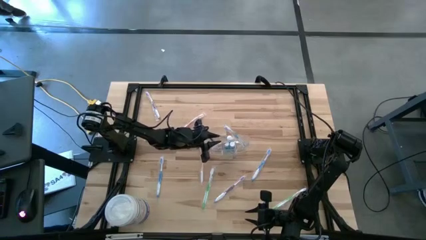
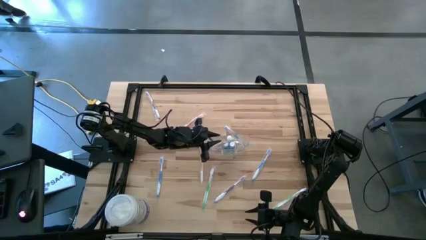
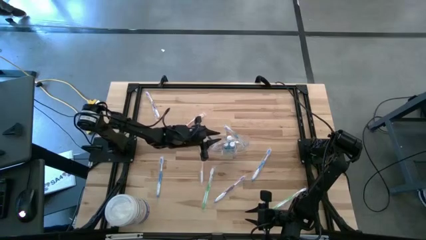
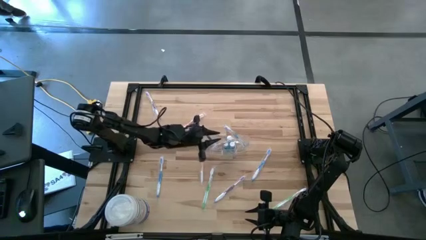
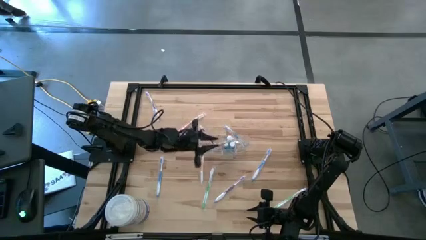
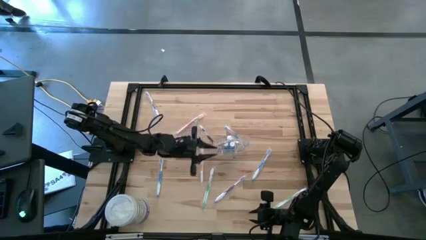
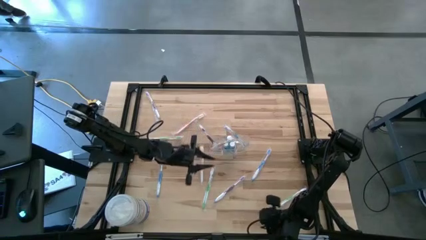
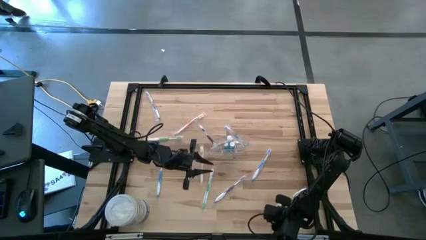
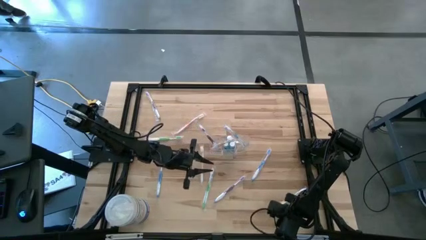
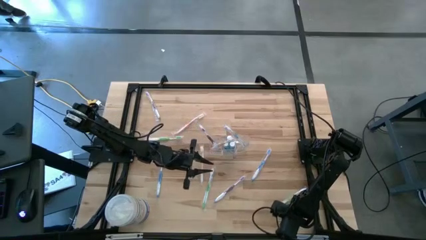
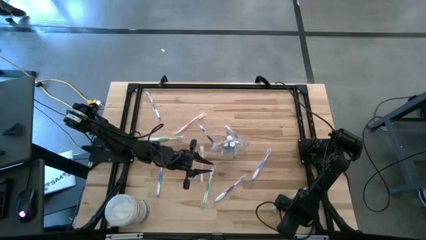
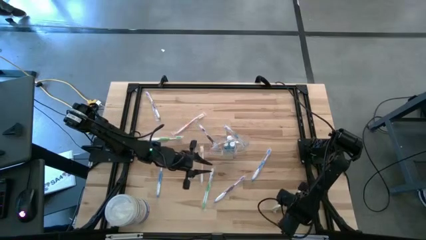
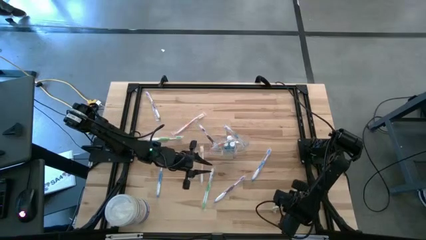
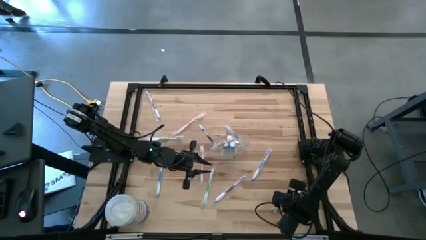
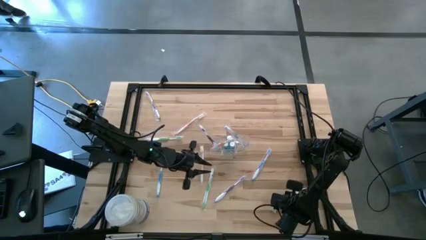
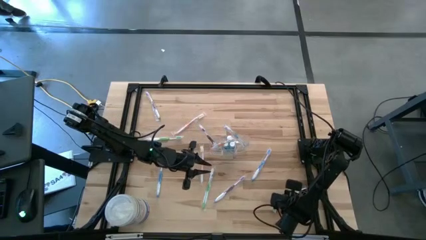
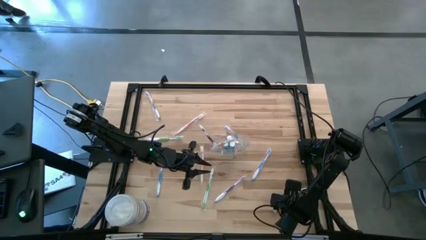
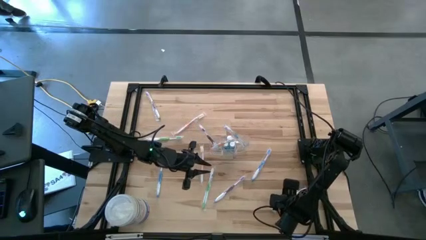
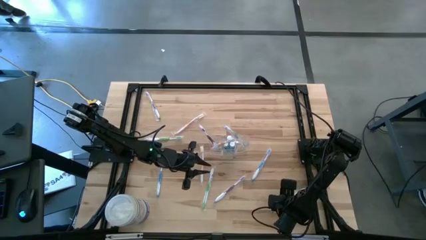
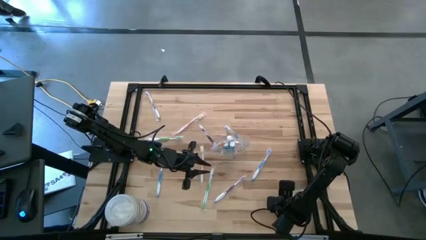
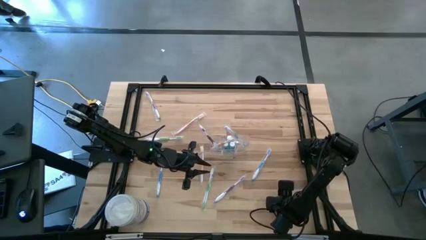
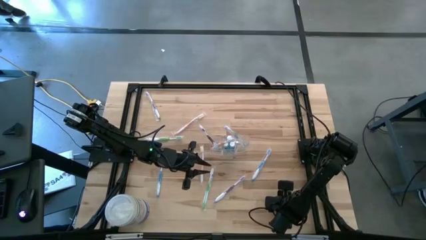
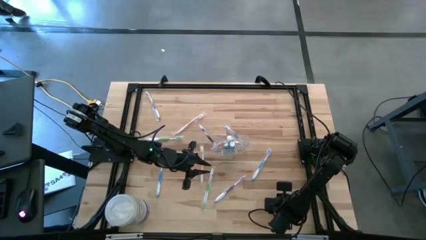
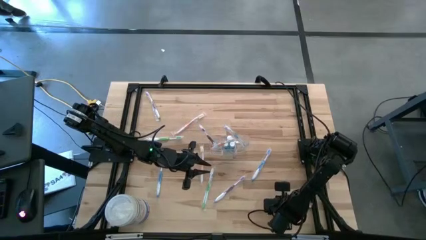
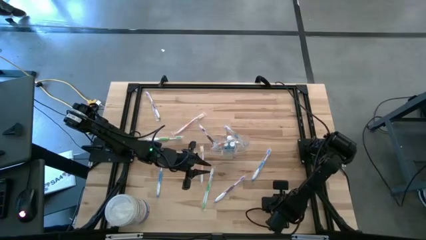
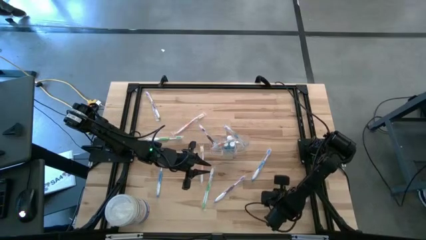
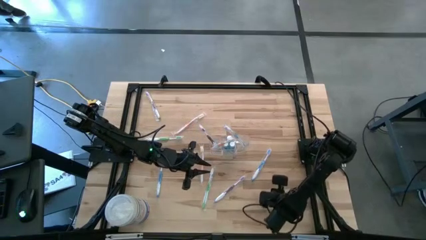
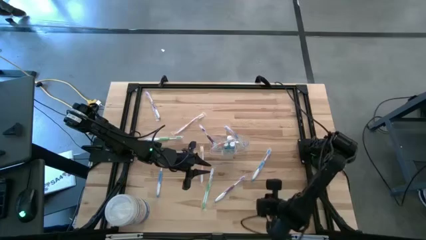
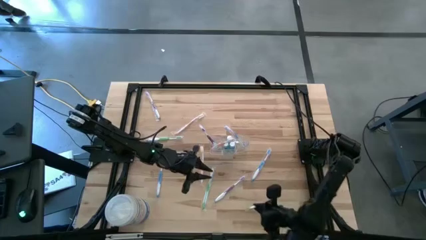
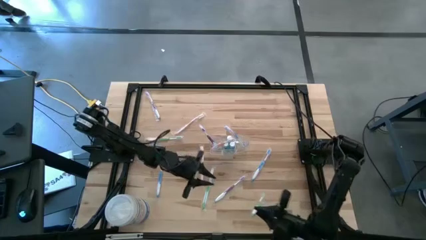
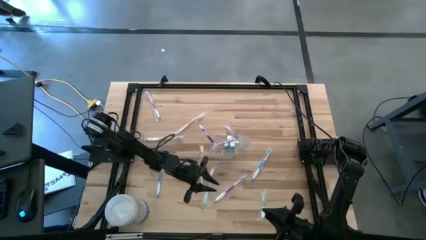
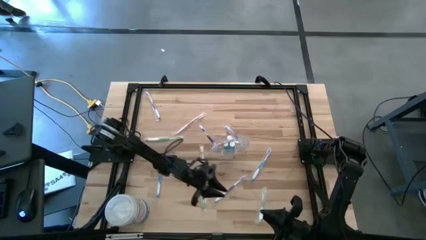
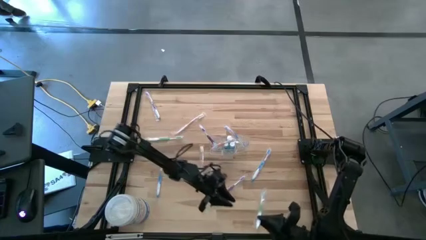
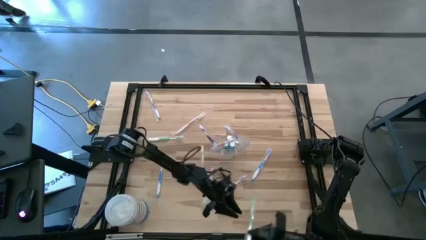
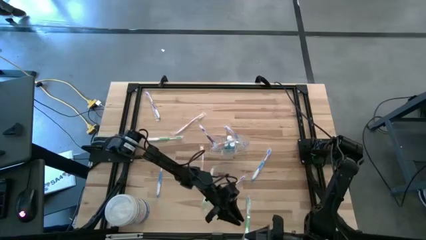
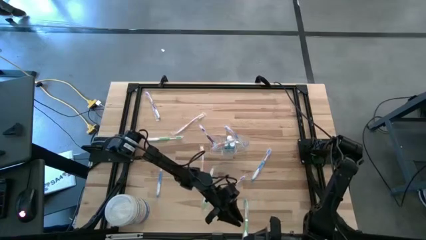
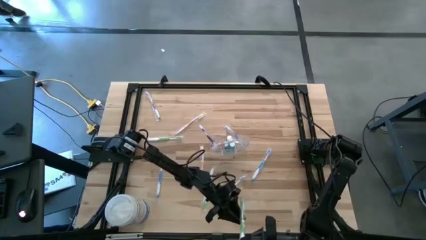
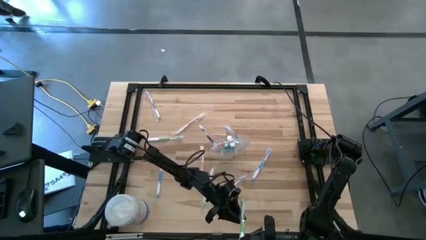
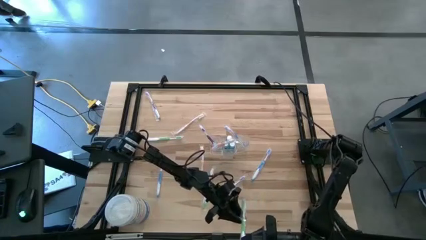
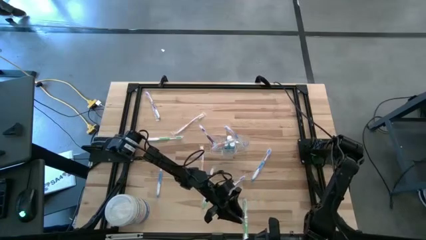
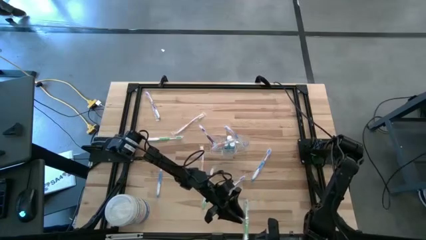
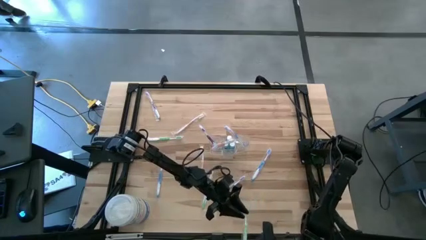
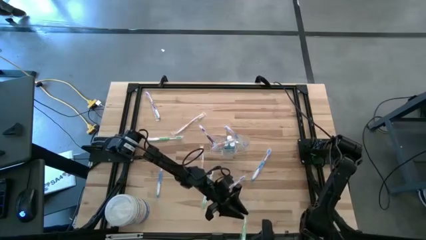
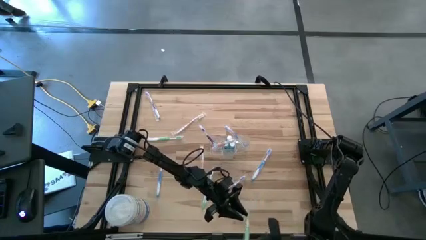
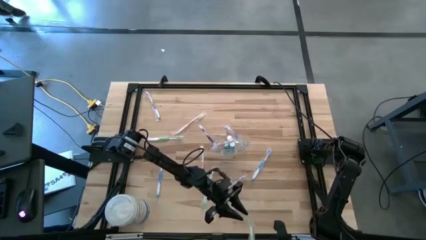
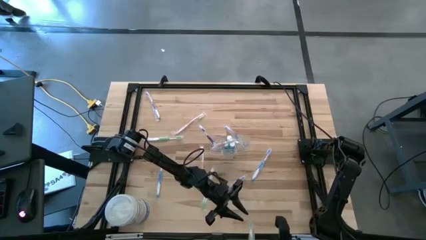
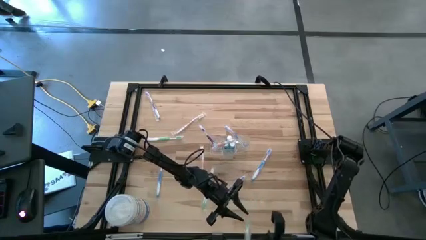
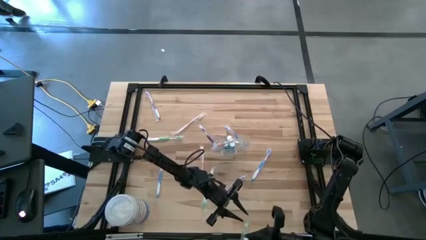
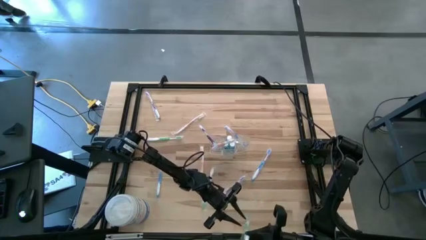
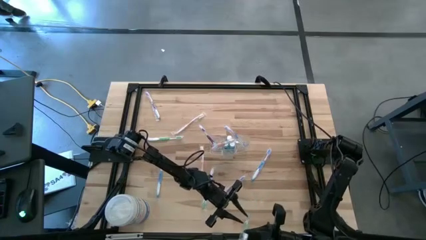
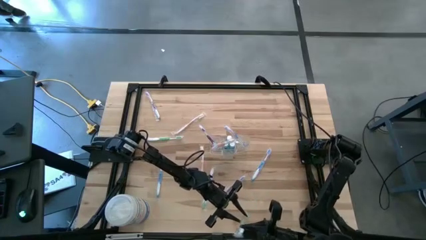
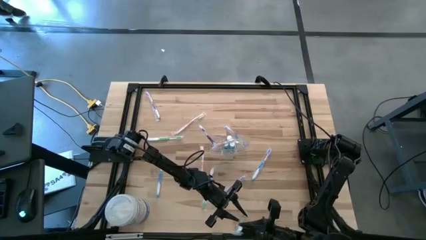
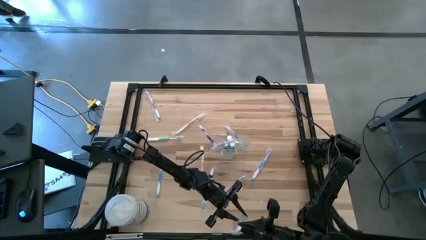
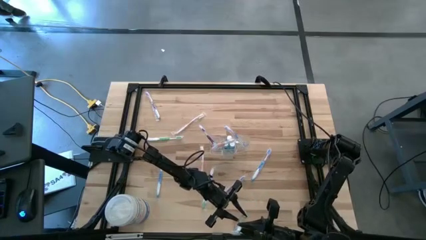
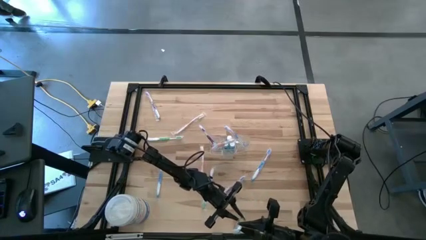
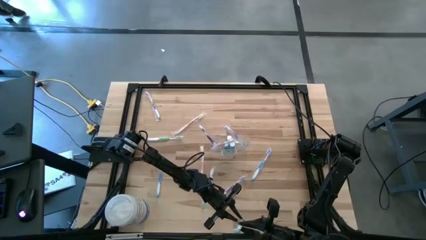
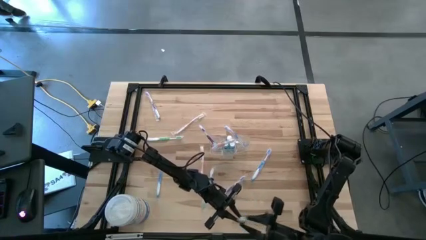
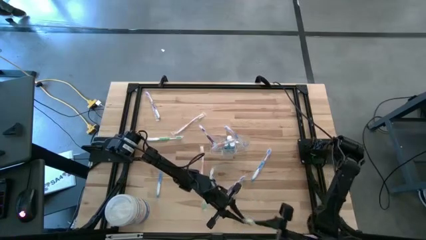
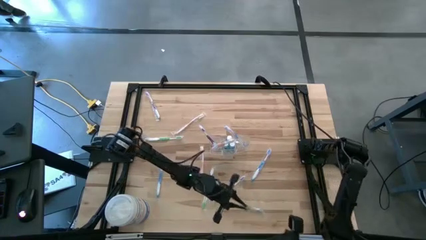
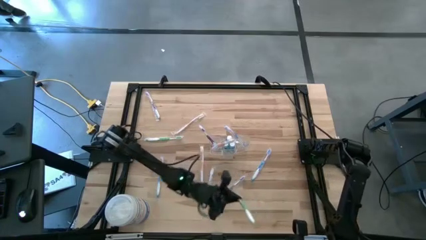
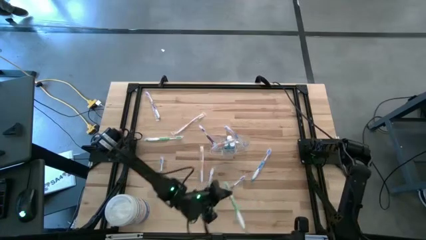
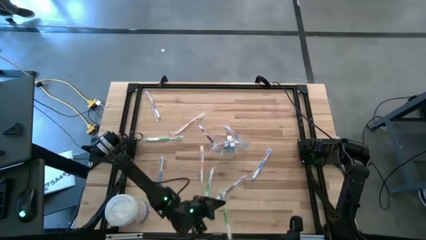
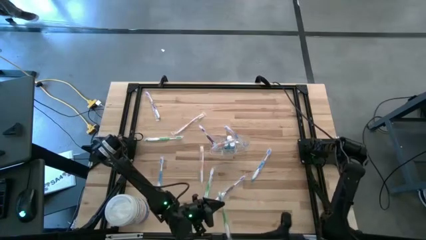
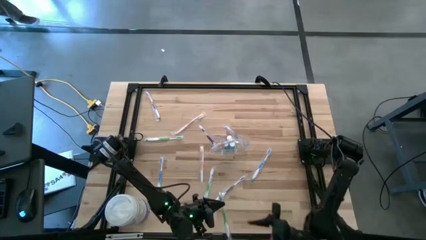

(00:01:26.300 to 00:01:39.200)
Task: Pick & Place toothbrushing station
Put the bottom right green toothbrush into the wire organizer
